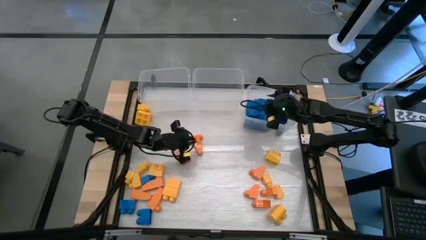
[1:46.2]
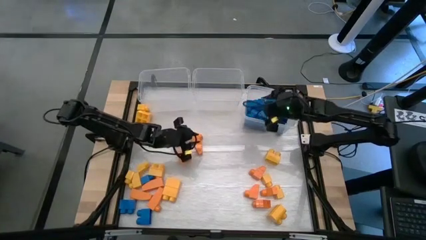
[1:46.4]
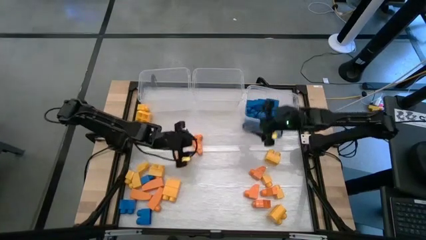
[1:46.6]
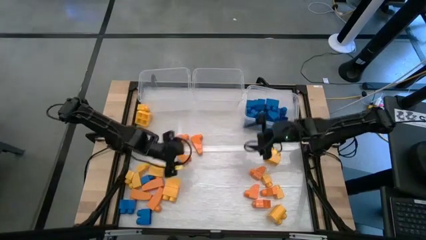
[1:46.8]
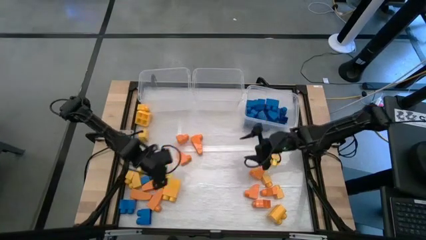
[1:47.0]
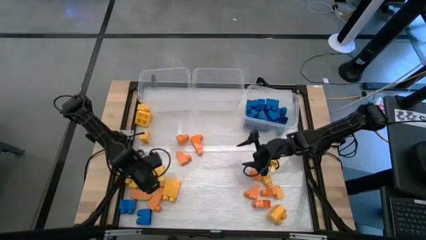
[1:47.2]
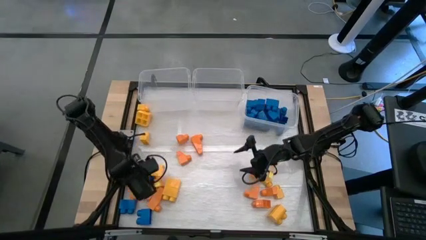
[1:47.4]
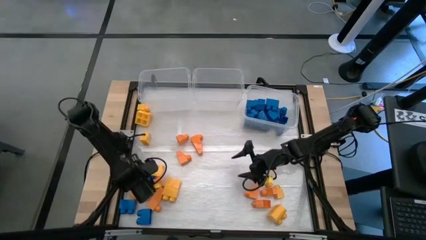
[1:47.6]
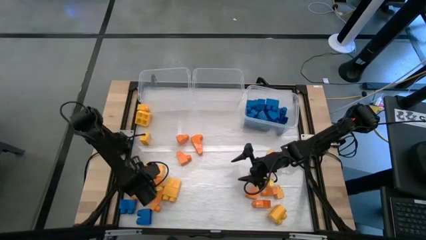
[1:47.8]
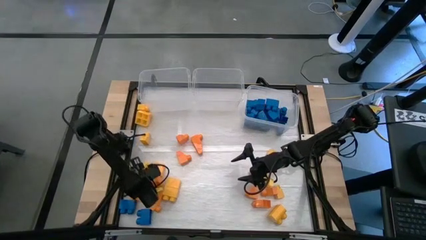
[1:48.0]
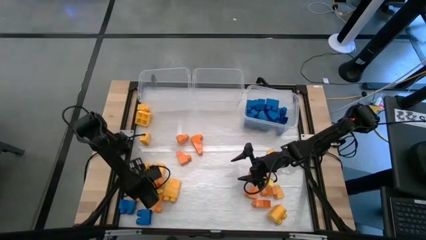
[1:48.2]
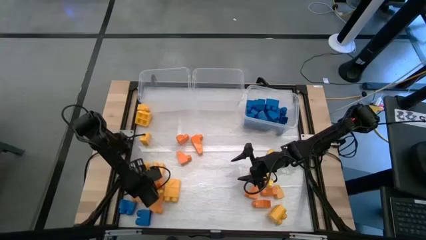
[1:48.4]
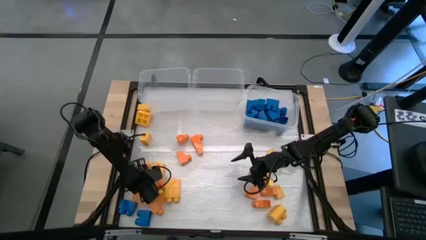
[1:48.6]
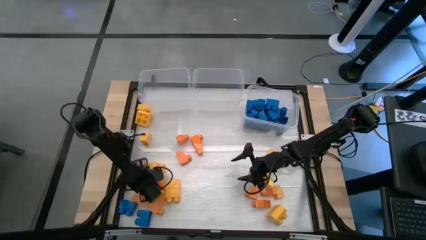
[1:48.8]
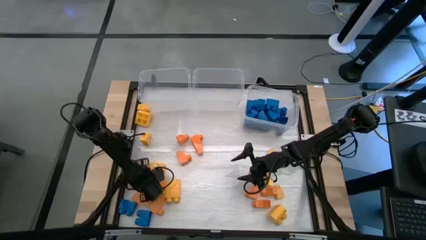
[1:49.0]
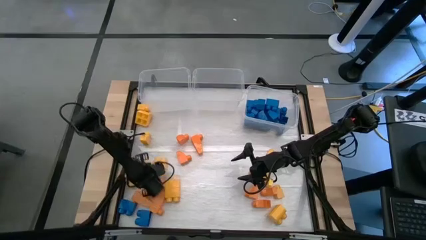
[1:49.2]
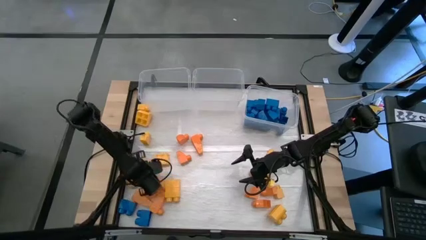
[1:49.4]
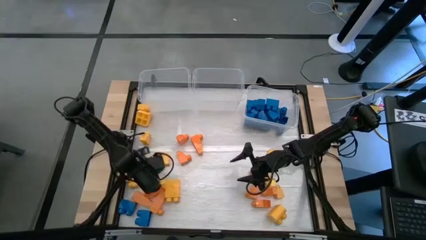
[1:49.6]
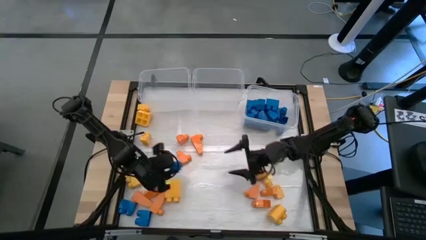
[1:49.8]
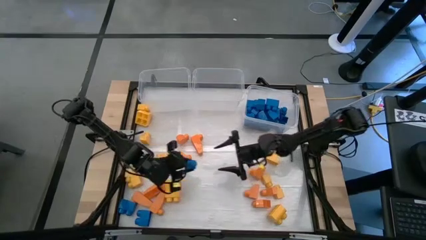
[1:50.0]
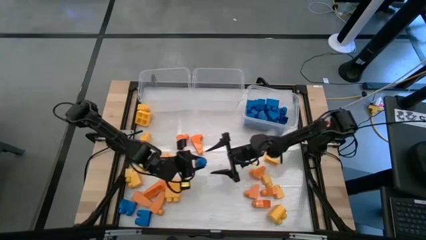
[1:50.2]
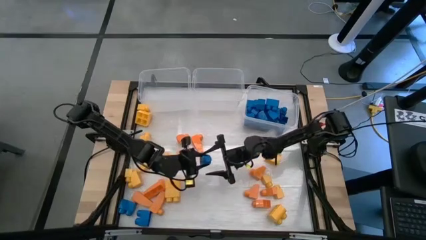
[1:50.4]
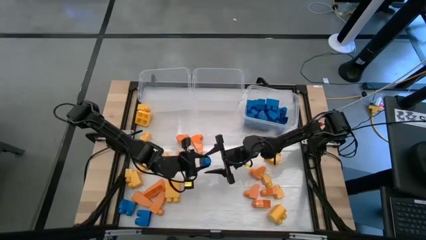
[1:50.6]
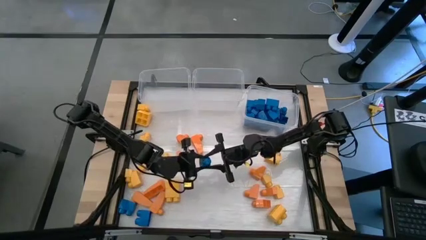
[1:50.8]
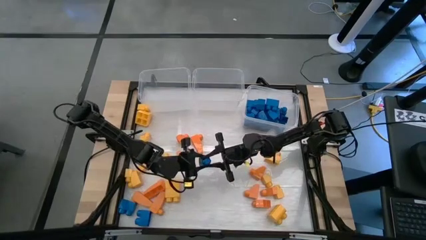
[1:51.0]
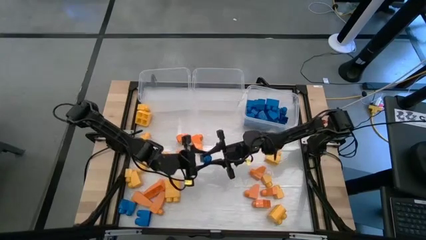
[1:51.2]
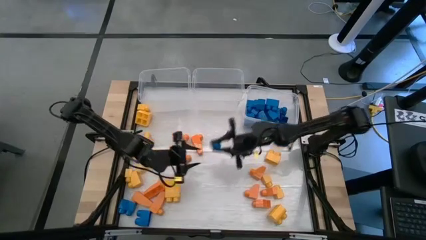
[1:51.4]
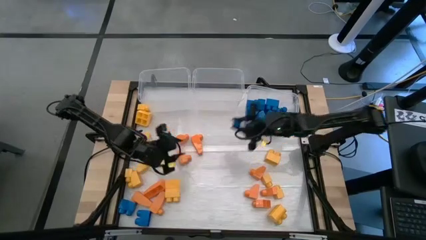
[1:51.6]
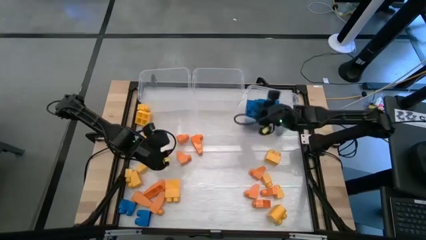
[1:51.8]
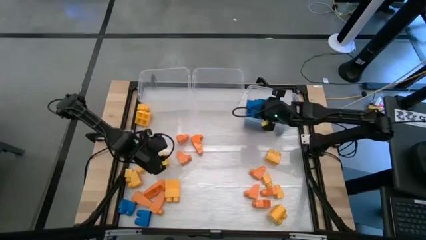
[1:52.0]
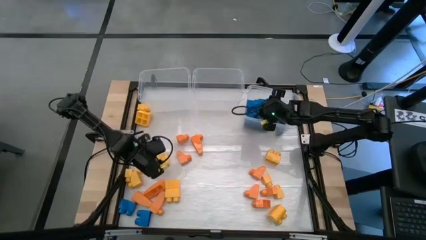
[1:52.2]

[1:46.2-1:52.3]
Task: Sort blocks
Put the blue game piece into the right transparent bin

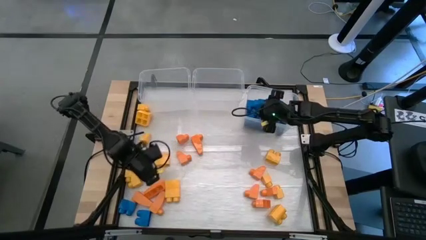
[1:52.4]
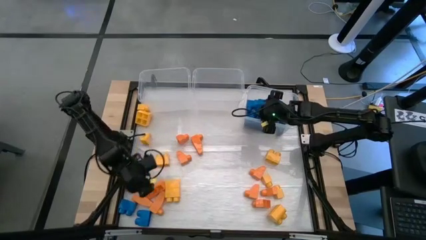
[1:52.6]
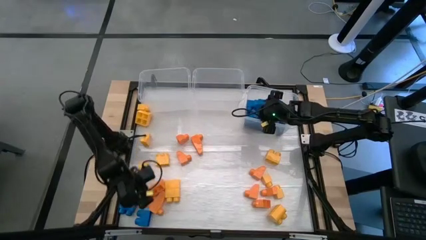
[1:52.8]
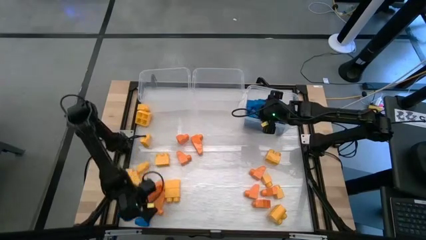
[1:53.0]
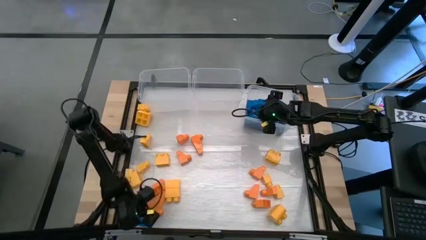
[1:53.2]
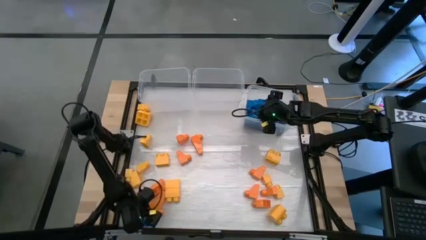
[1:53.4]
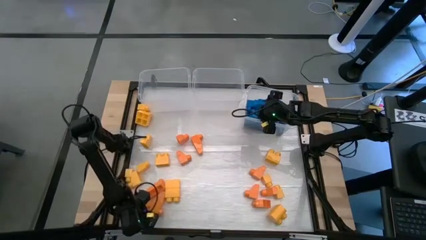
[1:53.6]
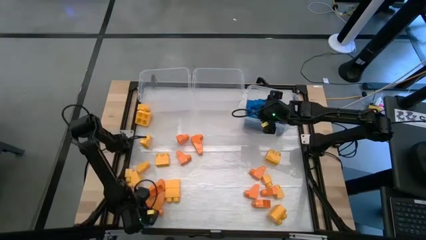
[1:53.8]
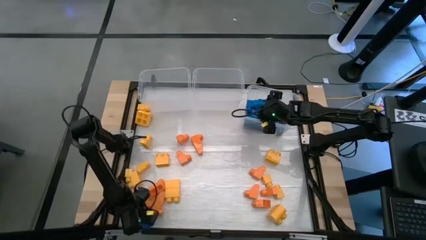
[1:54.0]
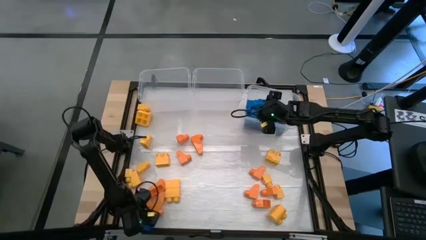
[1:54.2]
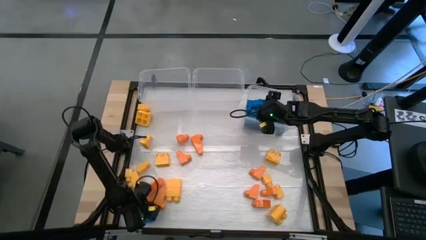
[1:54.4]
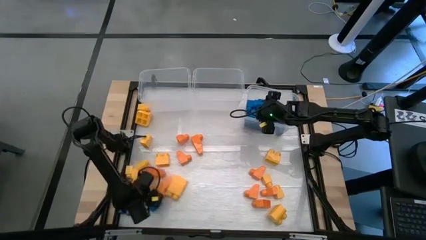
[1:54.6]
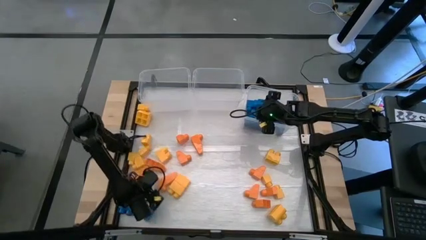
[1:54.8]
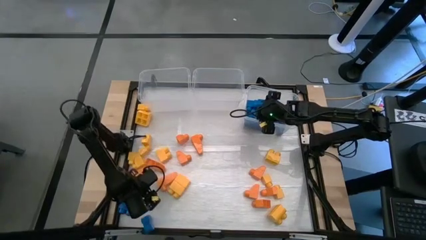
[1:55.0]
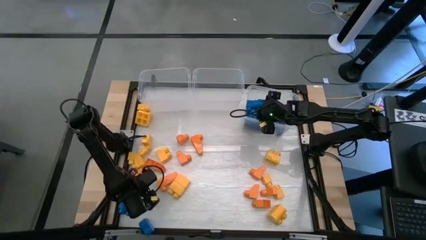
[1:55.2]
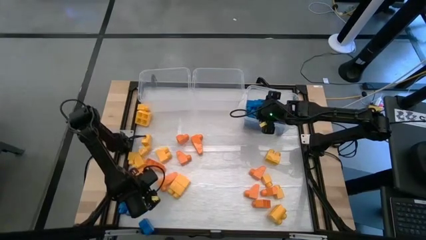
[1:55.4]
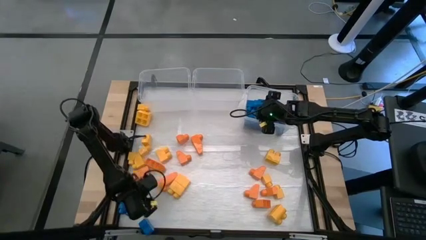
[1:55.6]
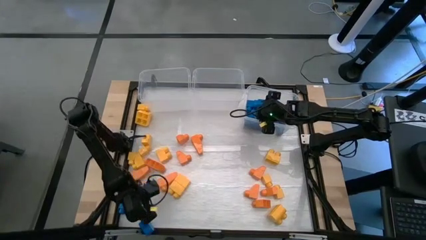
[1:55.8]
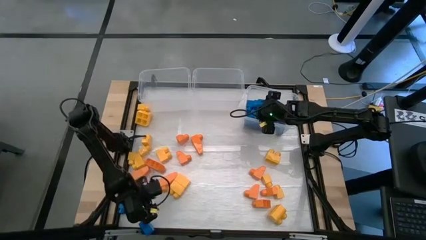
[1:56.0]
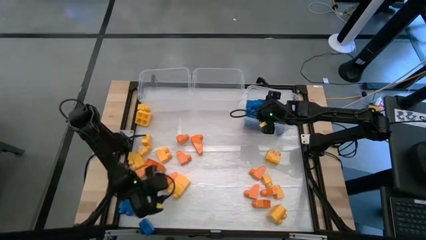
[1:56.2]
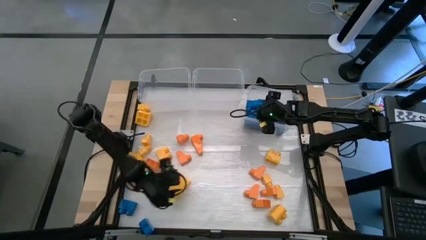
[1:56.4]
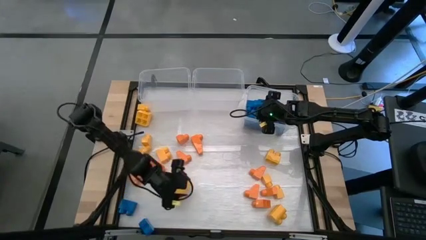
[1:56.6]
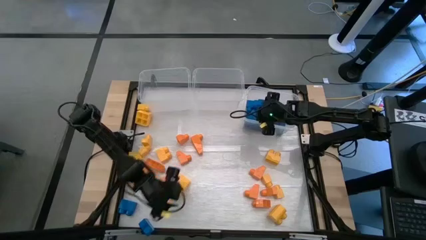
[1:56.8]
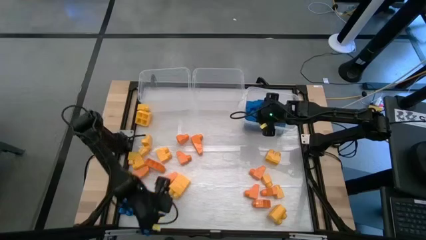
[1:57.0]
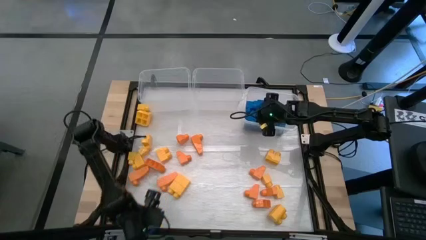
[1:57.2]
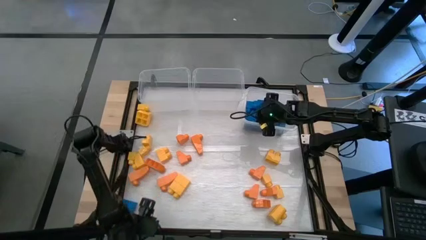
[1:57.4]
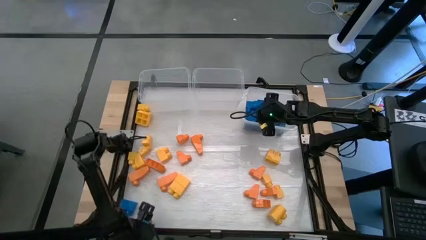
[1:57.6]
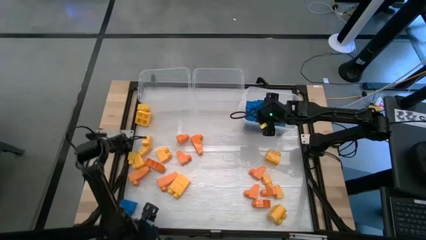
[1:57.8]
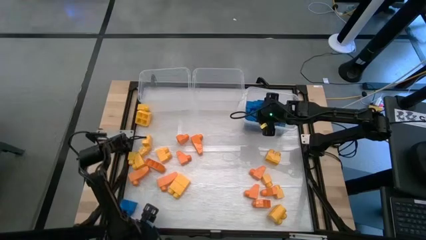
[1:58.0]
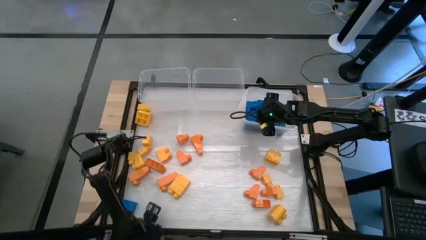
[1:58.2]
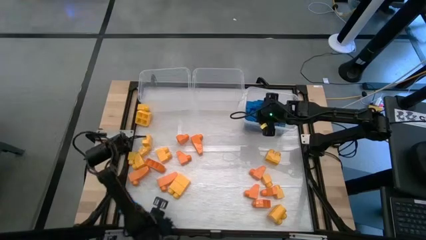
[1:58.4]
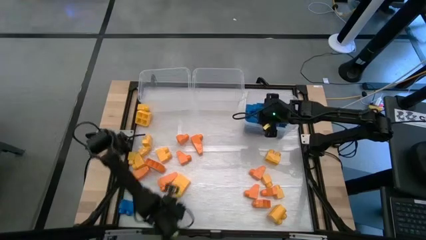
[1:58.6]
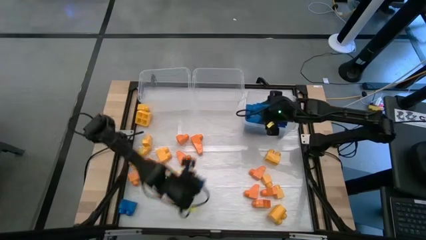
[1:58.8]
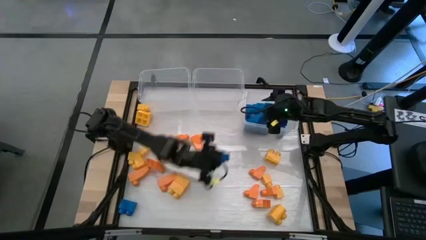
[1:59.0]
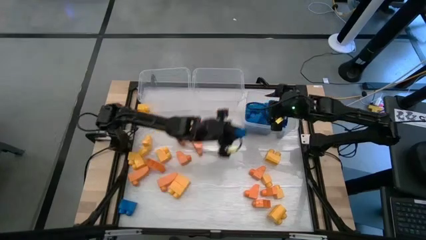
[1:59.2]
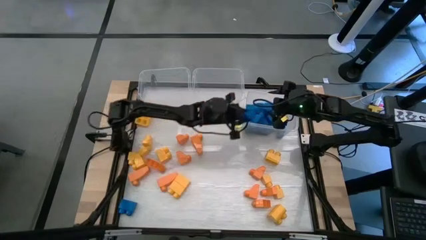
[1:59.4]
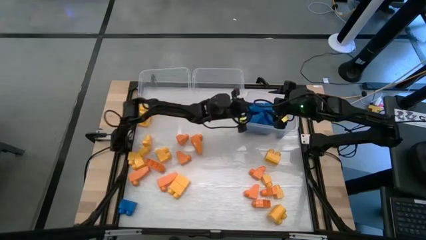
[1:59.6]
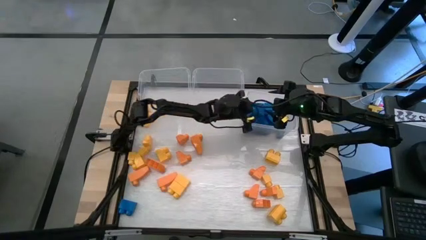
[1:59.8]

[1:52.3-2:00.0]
Put the blue game piece into the right transparent bin

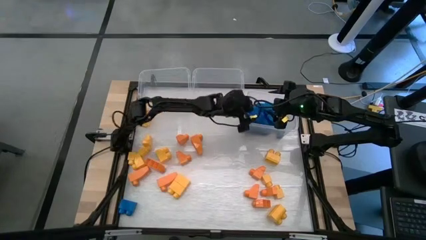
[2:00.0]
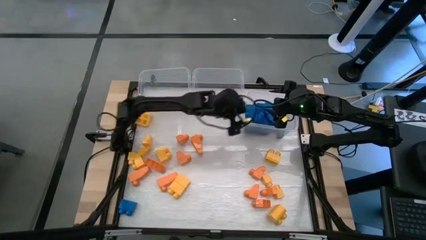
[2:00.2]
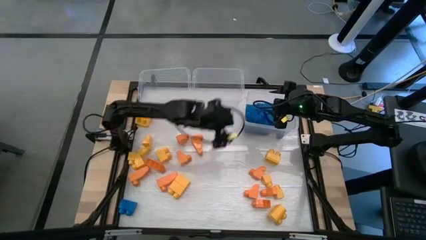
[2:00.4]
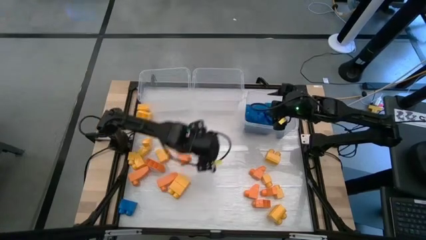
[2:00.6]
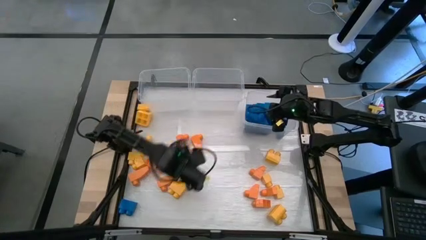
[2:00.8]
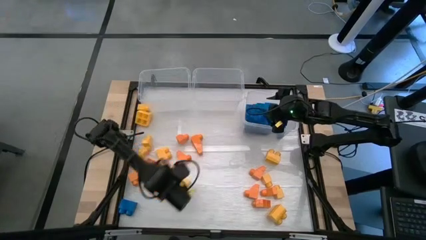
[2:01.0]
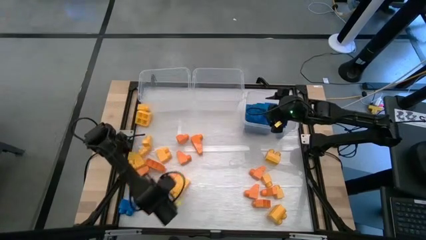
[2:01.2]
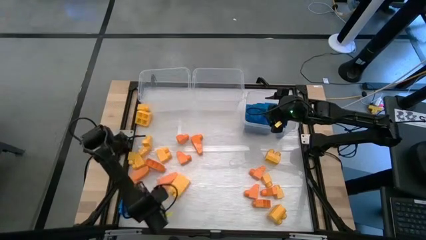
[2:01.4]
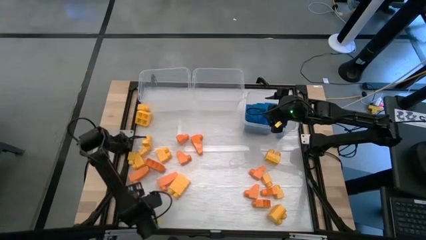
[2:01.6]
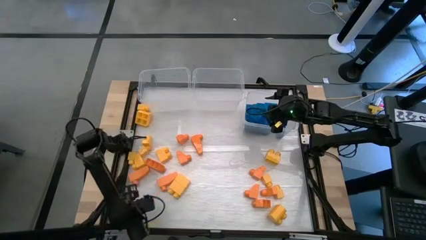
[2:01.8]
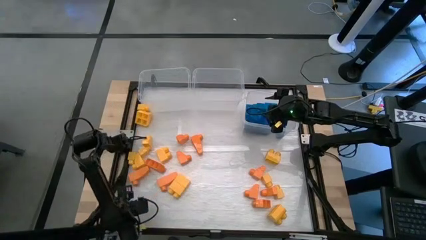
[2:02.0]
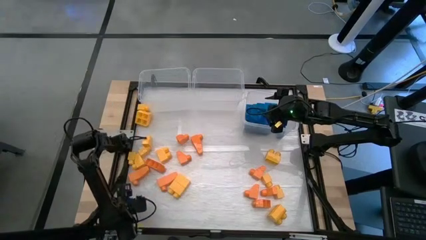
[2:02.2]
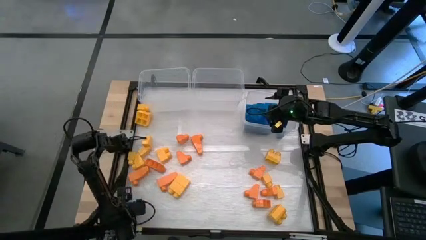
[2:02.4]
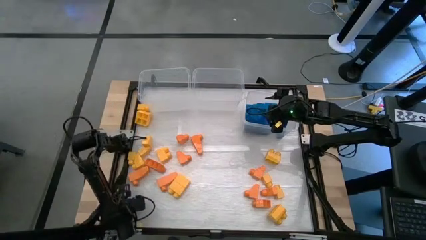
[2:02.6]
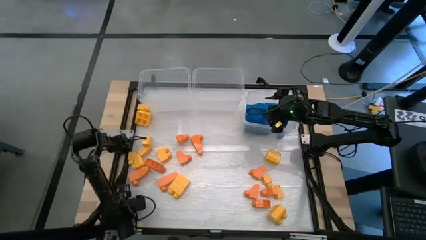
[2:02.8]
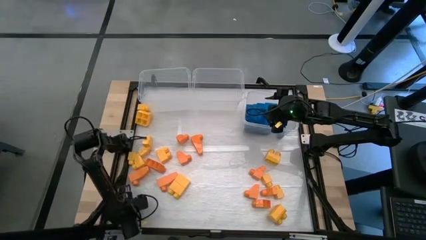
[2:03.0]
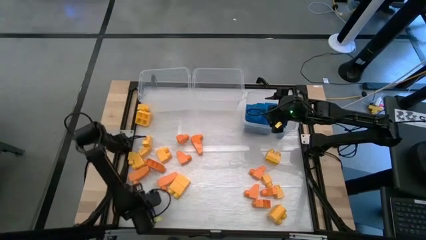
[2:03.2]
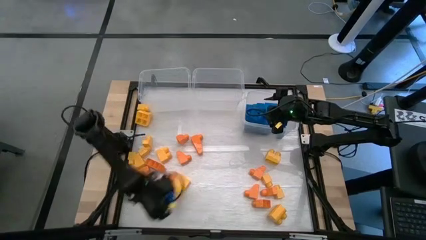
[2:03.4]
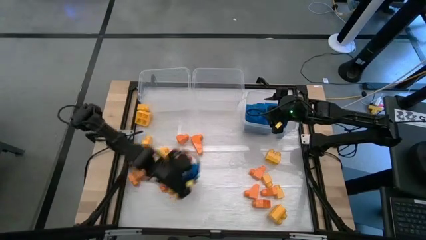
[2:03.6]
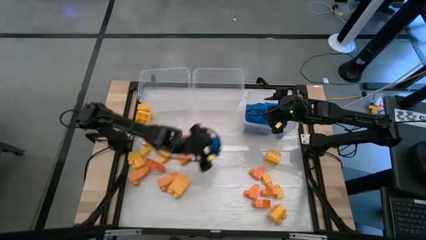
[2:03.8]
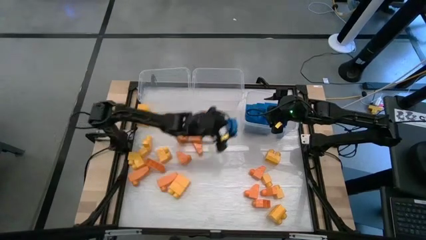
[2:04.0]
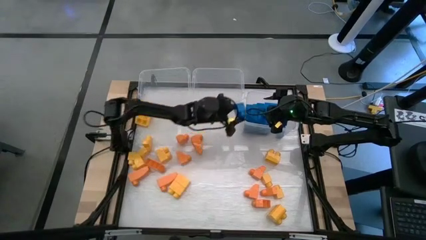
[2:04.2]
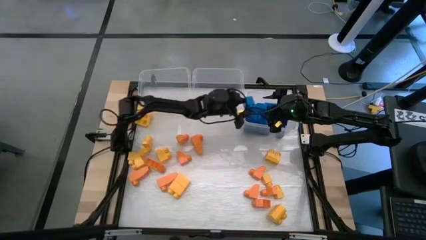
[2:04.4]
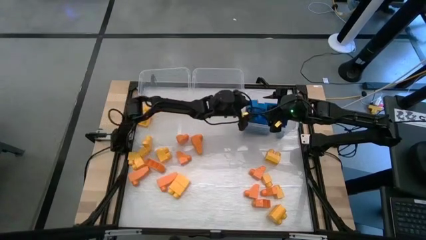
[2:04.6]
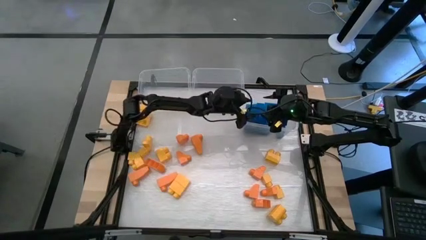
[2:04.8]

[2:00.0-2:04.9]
Put the blue game piece into the right transparent bin
